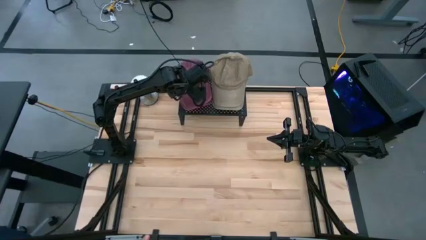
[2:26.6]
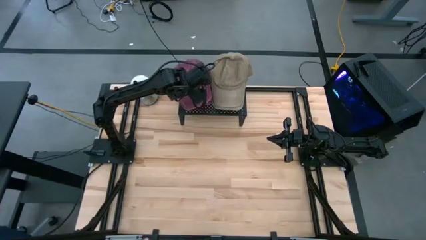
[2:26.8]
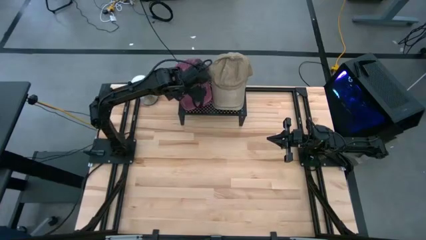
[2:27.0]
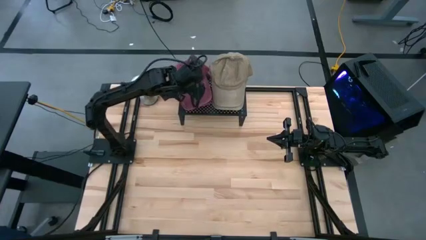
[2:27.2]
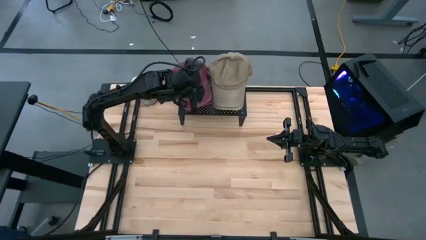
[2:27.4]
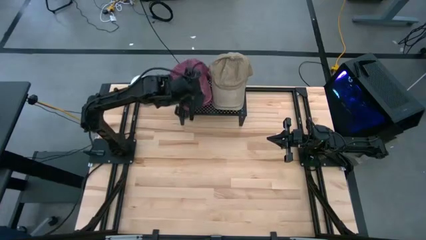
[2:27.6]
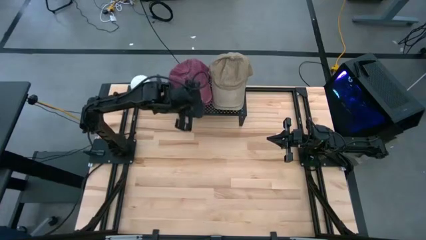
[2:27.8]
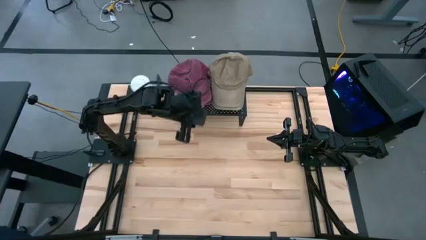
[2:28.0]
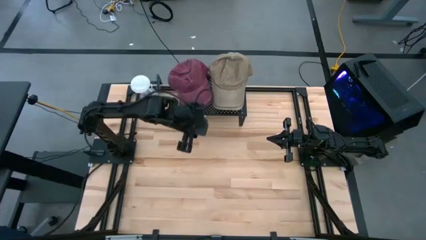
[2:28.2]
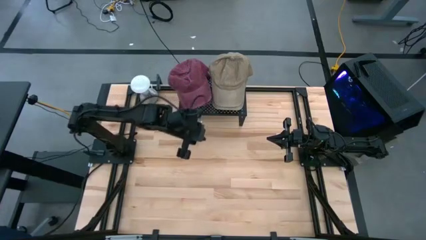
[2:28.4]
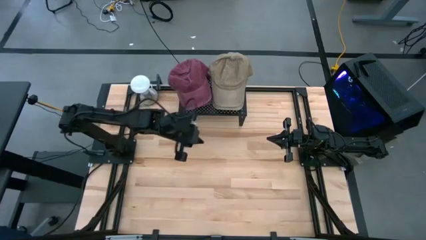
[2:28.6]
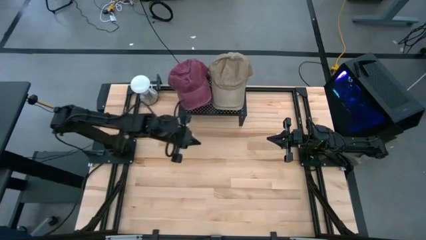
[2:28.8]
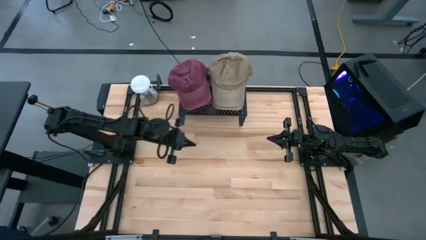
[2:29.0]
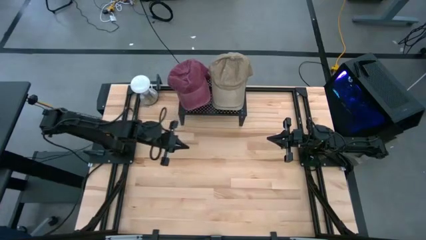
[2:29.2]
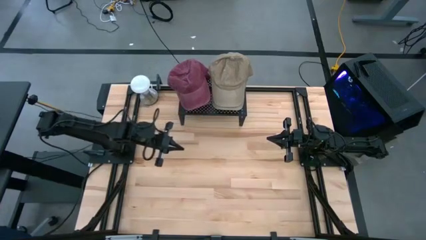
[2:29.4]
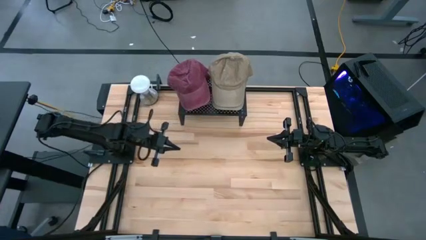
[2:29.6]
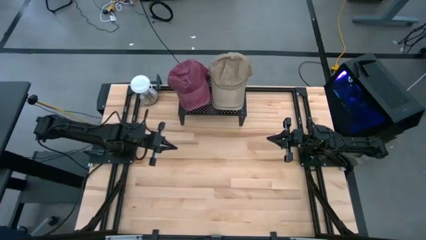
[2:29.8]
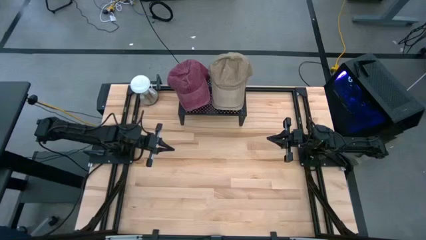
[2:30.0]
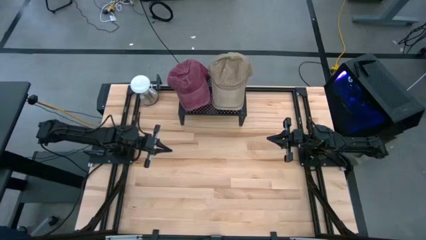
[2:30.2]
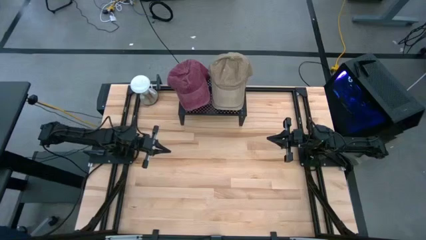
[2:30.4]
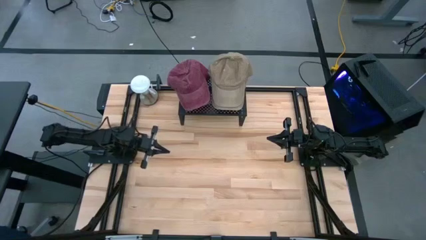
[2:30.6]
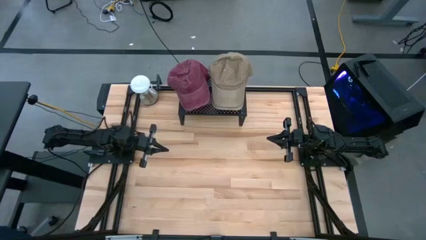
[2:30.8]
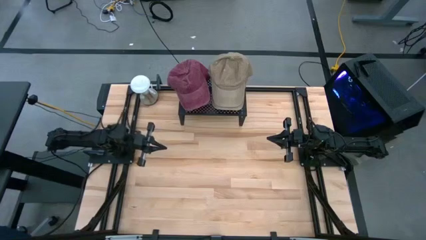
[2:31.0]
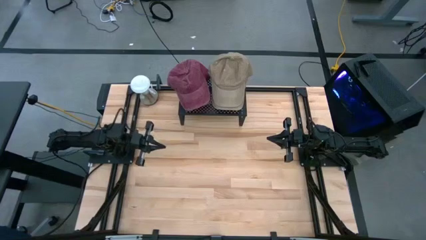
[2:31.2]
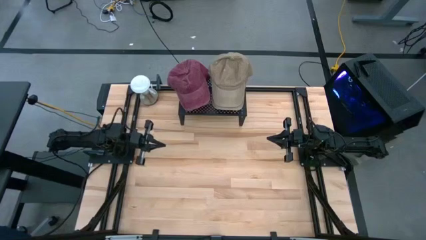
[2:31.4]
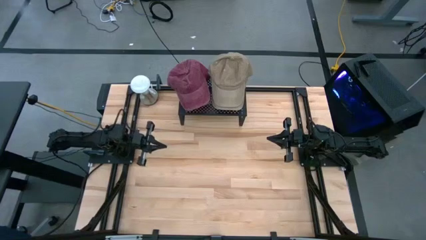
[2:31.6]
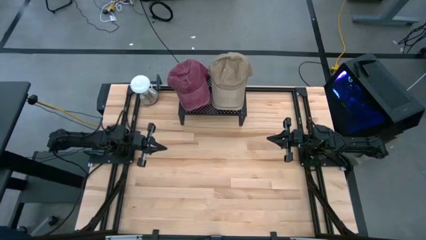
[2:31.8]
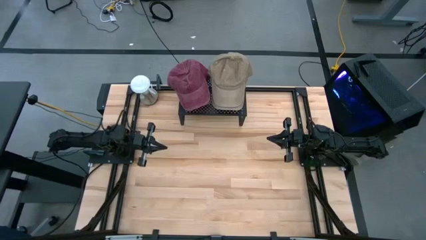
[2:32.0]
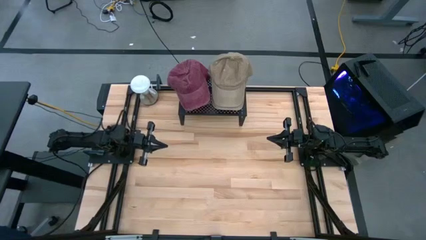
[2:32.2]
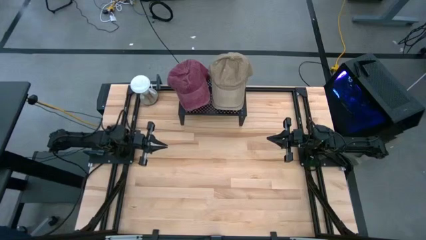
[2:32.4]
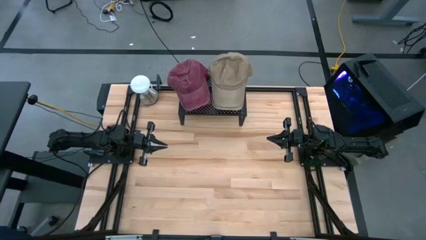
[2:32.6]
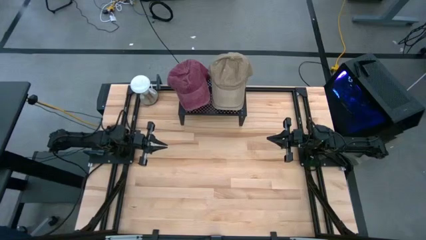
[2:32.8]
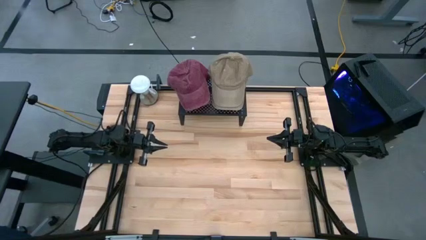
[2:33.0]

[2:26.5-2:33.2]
Task: Pick & Place hat
Return to Home Position

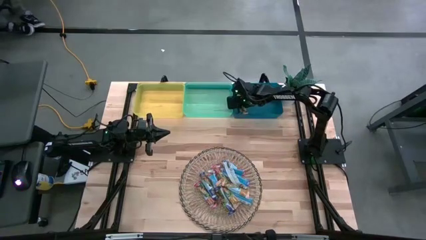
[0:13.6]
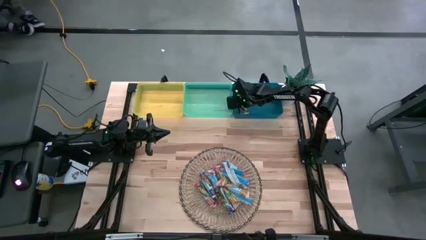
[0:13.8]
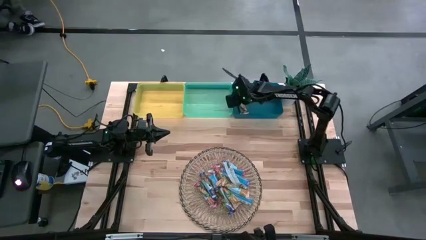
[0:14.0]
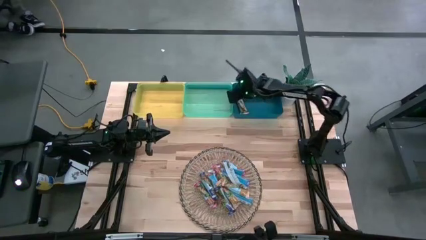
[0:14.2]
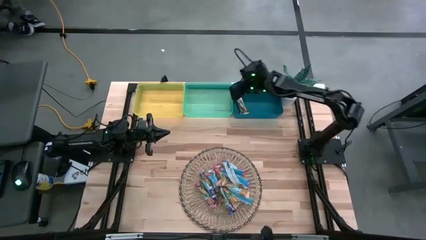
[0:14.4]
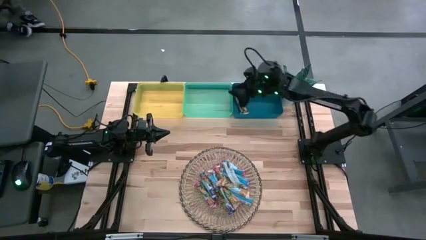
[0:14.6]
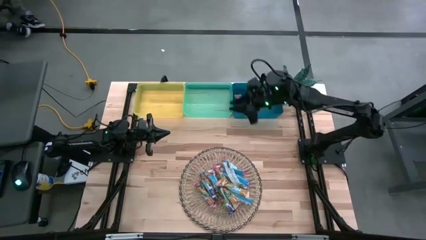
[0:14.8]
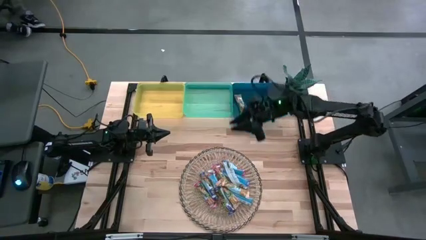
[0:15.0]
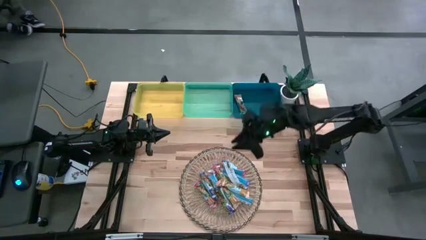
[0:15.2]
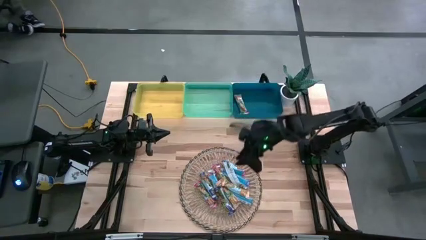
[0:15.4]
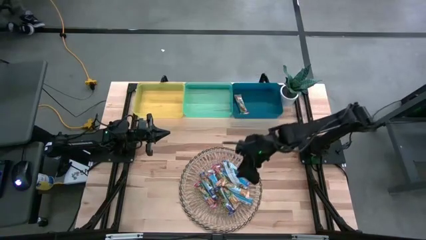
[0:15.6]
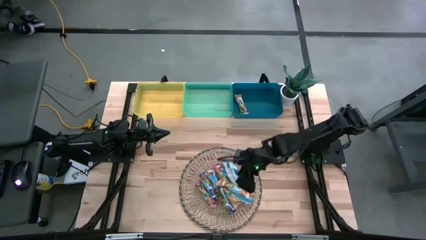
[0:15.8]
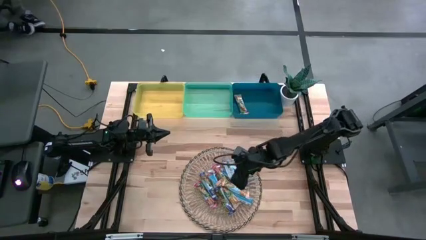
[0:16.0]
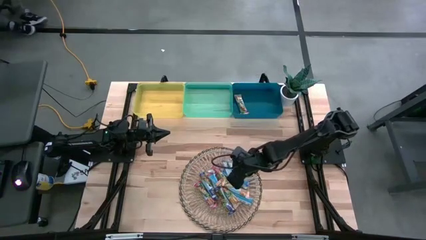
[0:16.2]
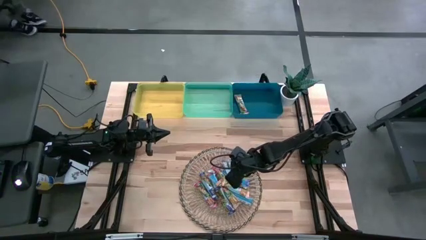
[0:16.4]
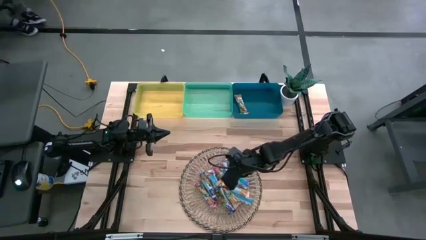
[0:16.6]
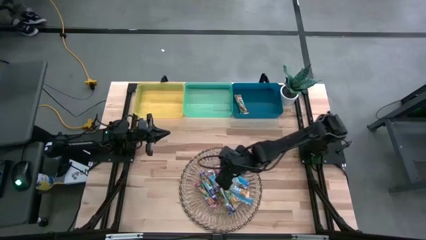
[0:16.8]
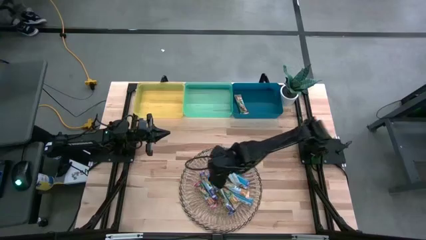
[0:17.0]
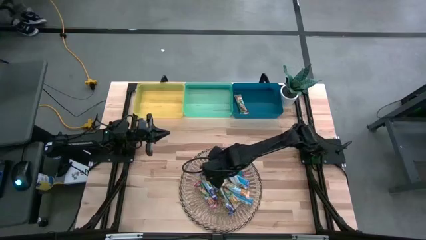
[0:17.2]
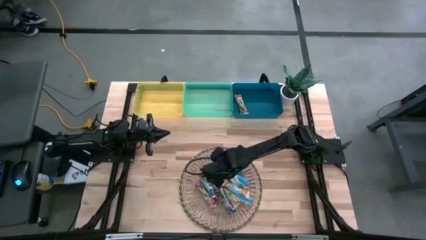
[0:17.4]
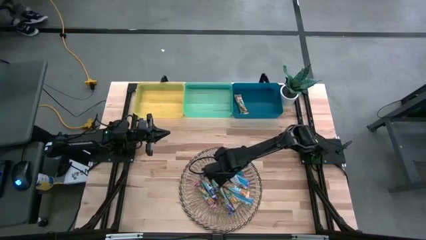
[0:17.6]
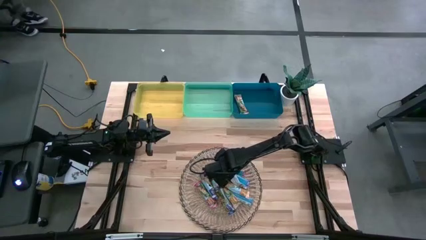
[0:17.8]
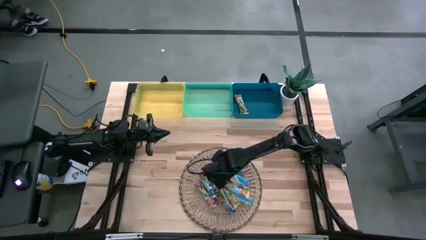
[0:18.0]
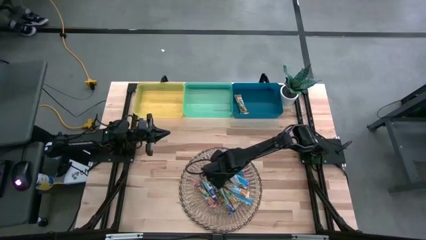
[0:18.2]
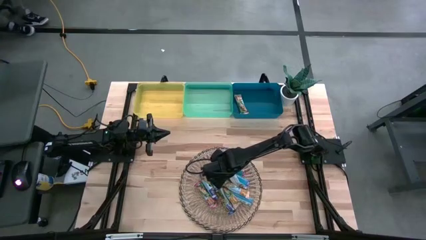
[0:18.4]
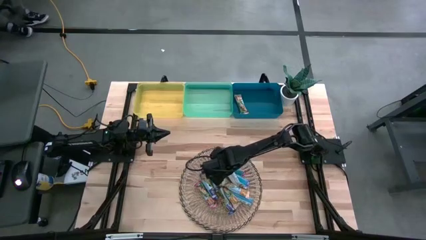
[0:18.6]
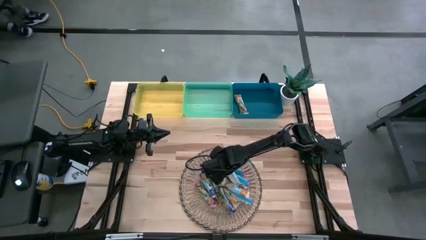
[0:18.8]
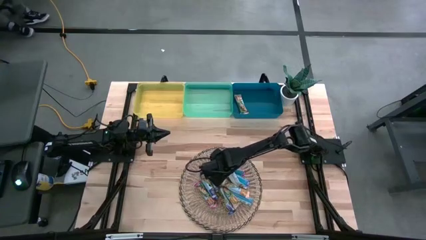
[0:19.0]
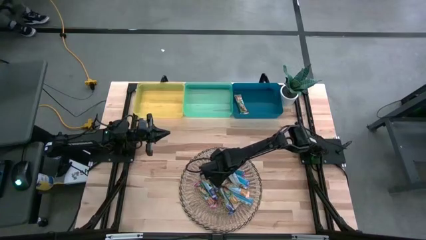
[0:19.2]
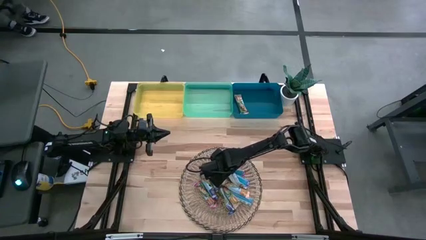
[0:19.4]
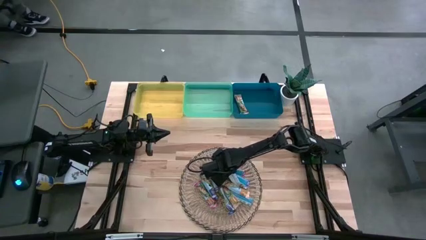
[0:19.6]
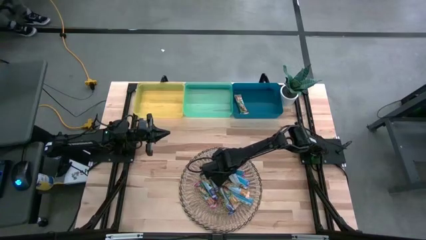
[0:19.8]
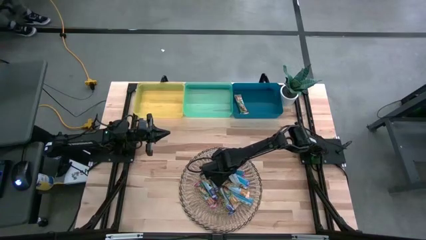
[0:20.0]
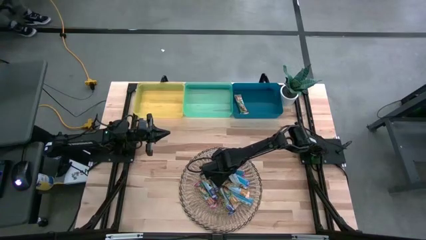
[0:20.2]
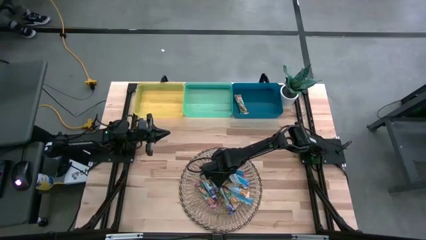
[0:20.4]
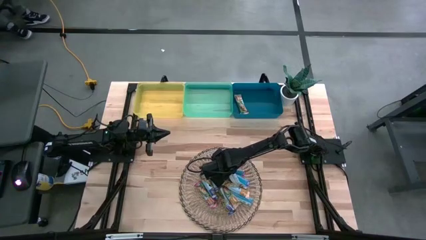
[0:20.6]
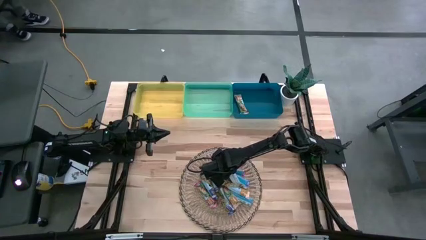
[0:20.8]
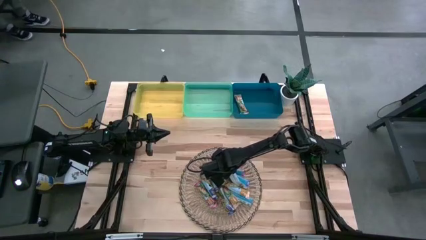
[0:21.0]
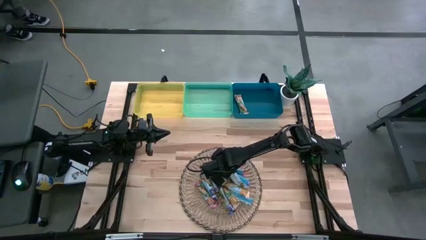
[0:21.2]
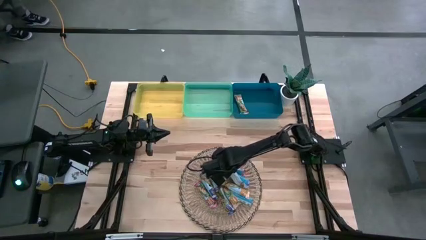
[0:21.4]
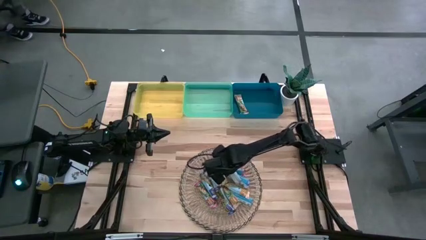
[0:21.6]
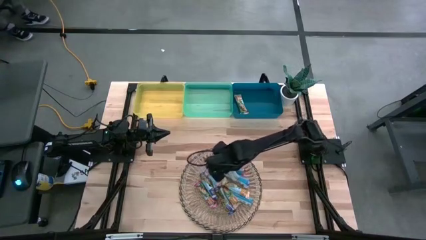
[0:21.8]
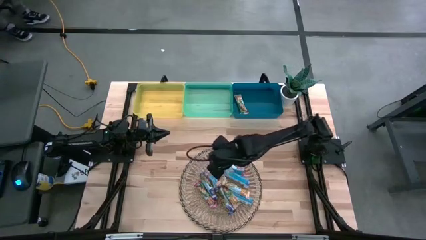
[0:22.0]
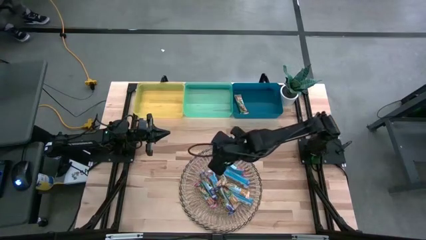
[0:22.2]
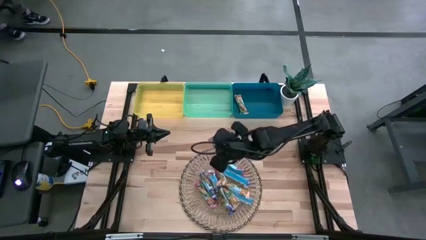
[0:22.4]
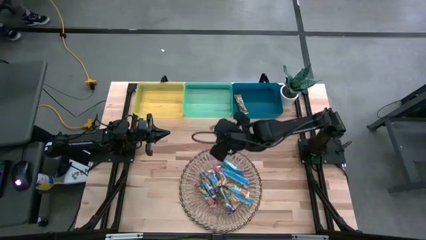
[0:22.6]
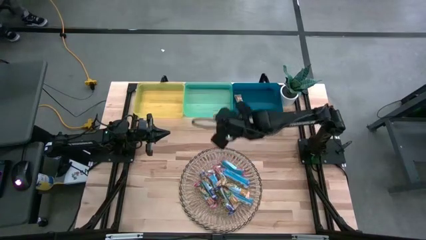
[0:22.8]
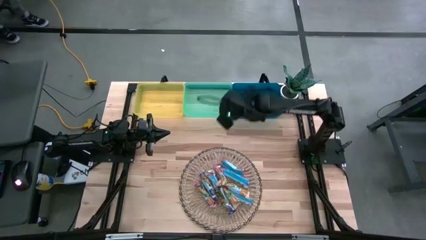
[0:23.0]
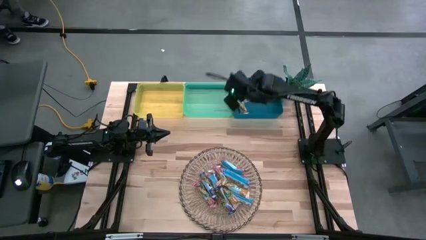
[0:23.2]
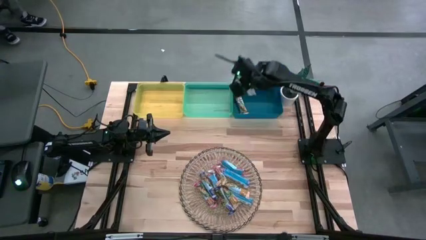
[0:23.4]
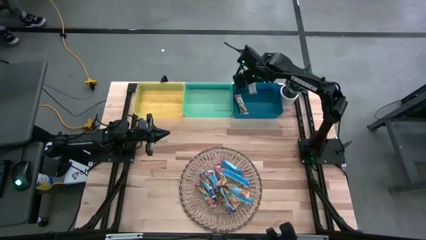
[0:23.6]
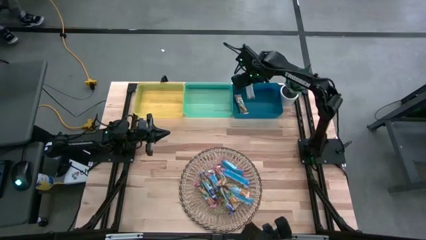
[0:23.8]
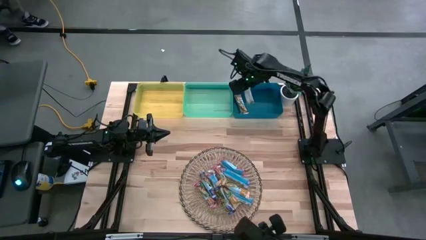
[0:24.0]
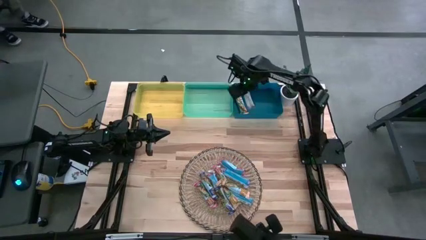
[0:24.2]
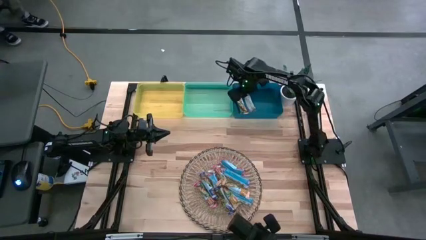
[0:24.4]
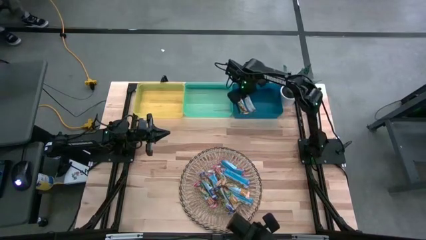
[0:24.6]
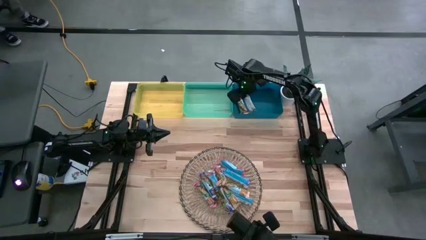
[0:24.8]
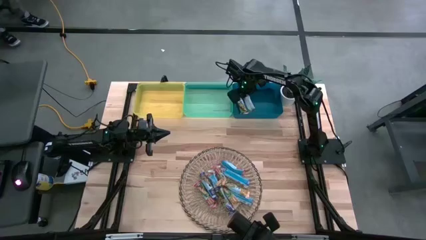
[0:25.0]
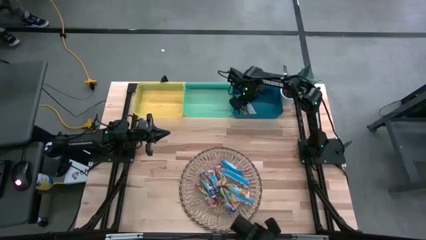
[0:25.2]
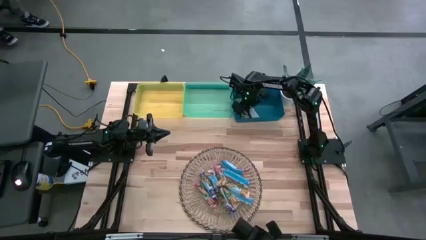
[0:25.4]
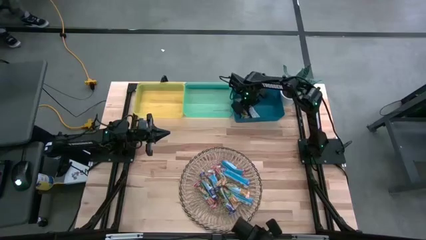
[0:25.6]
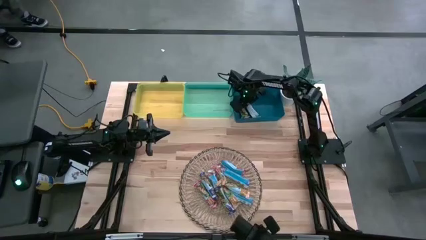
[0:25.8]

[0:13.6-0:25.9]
Task: Pick and place Granola Bars by type
Put the orange granola bar into the blue bin
